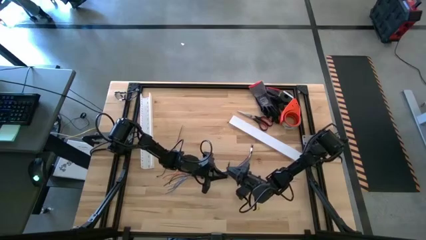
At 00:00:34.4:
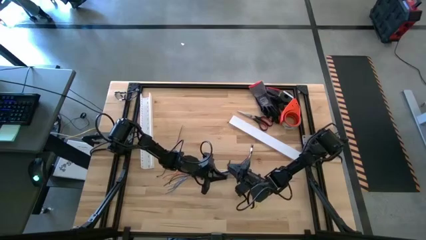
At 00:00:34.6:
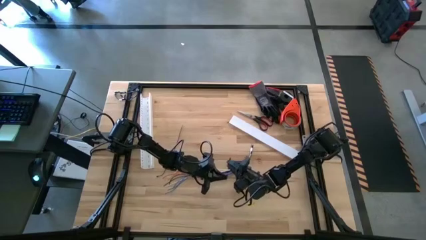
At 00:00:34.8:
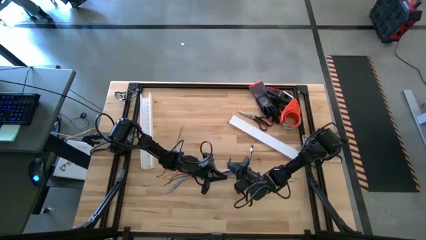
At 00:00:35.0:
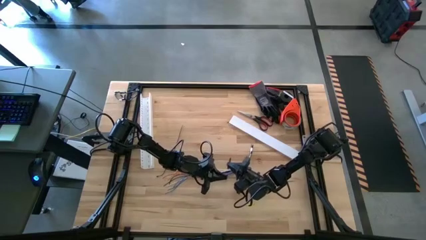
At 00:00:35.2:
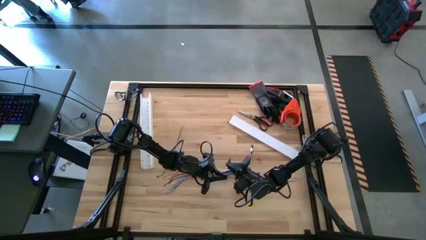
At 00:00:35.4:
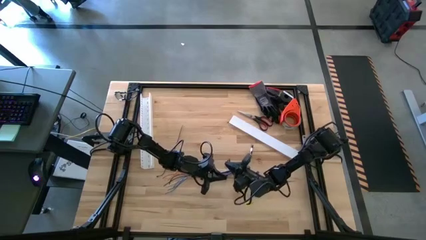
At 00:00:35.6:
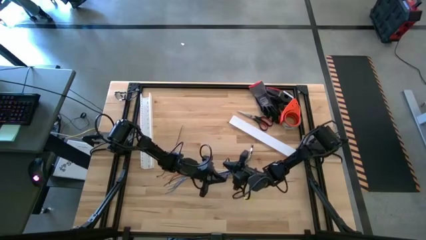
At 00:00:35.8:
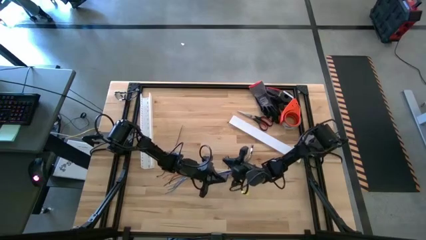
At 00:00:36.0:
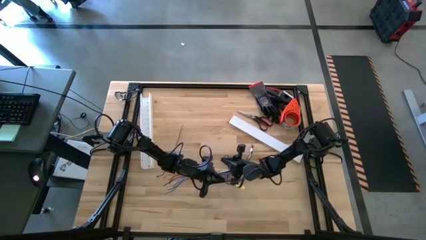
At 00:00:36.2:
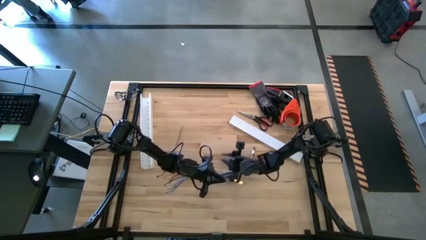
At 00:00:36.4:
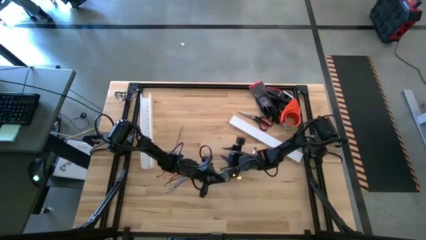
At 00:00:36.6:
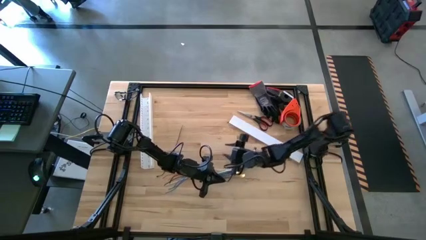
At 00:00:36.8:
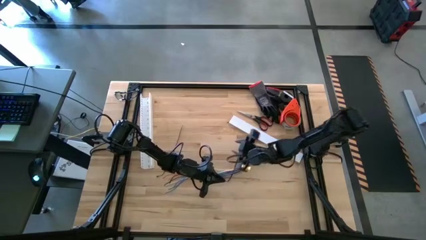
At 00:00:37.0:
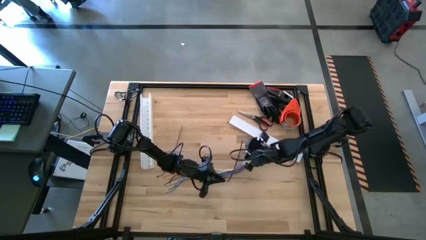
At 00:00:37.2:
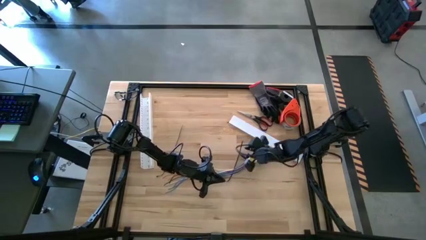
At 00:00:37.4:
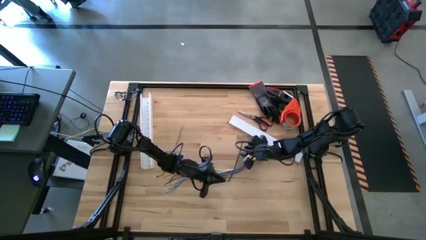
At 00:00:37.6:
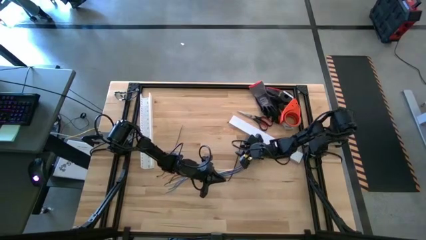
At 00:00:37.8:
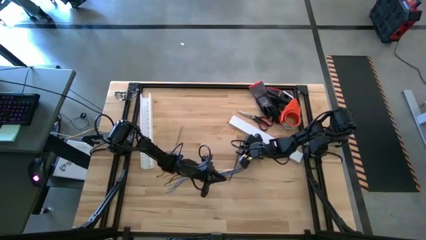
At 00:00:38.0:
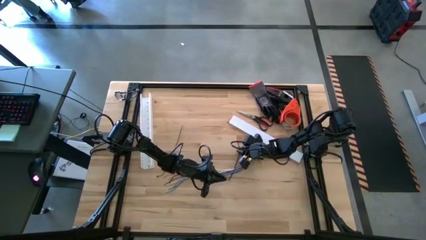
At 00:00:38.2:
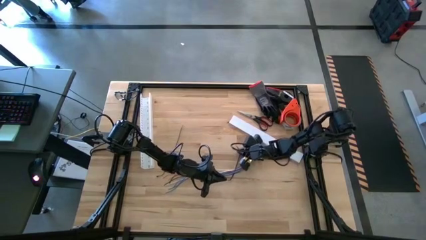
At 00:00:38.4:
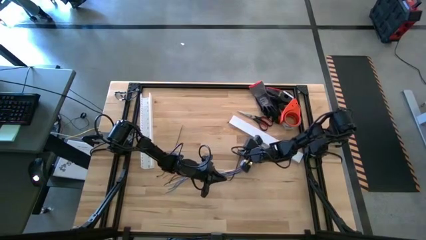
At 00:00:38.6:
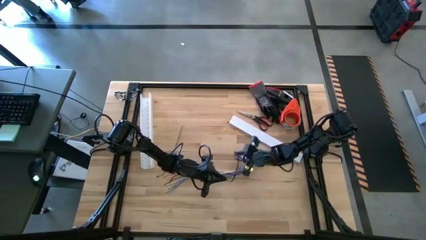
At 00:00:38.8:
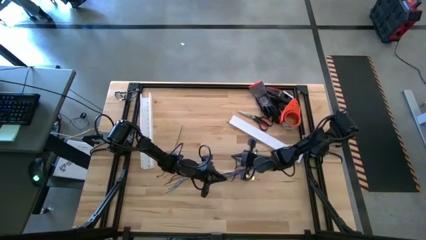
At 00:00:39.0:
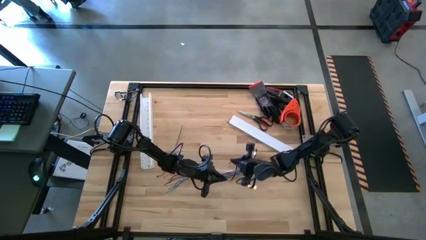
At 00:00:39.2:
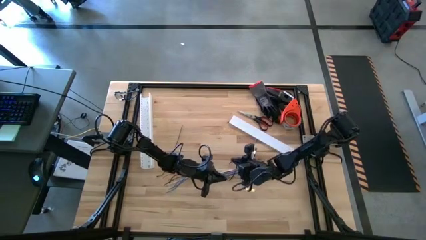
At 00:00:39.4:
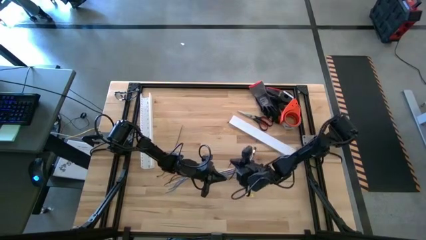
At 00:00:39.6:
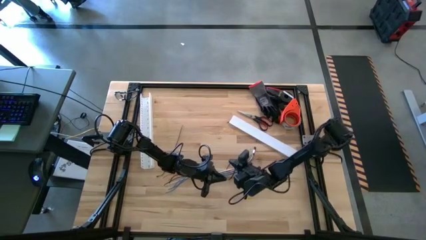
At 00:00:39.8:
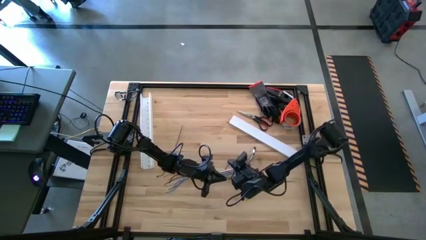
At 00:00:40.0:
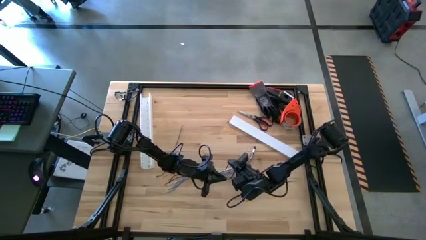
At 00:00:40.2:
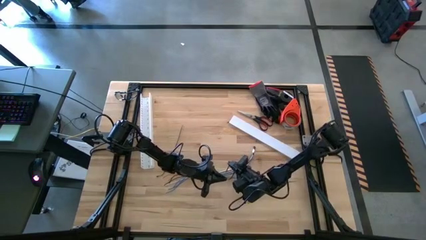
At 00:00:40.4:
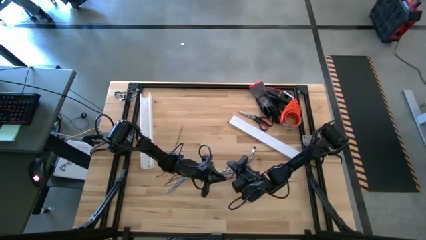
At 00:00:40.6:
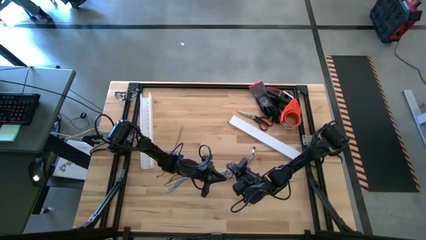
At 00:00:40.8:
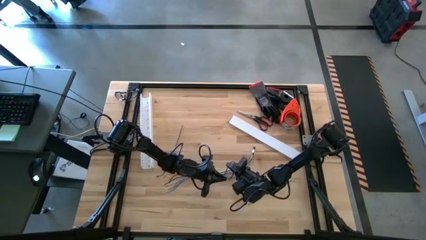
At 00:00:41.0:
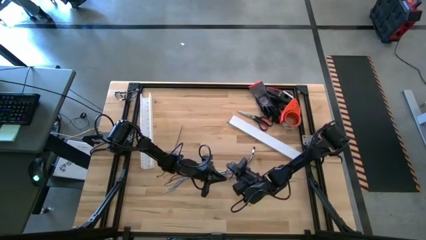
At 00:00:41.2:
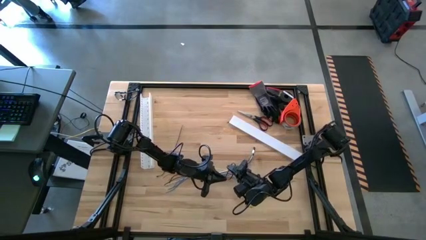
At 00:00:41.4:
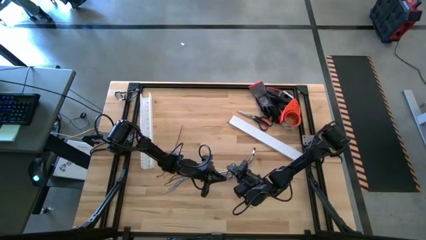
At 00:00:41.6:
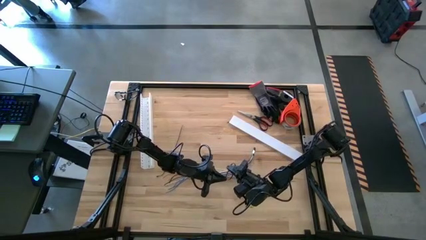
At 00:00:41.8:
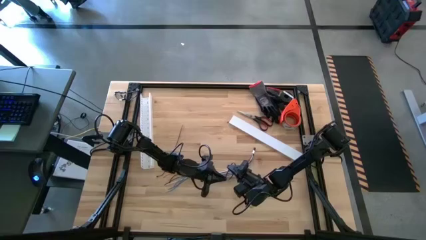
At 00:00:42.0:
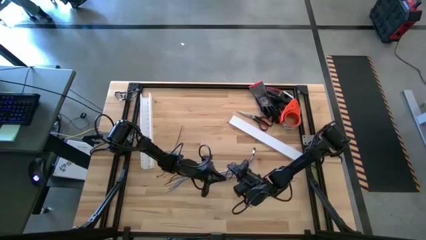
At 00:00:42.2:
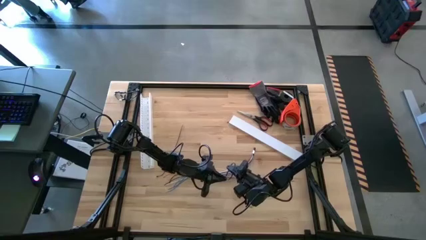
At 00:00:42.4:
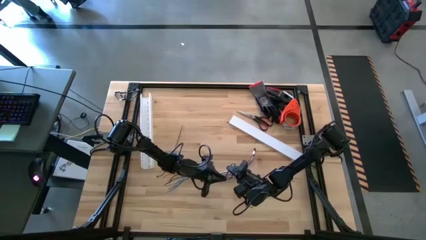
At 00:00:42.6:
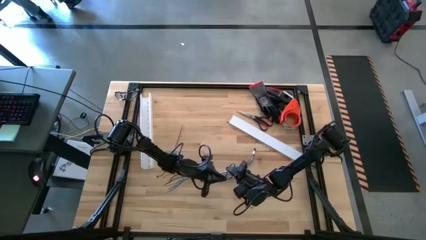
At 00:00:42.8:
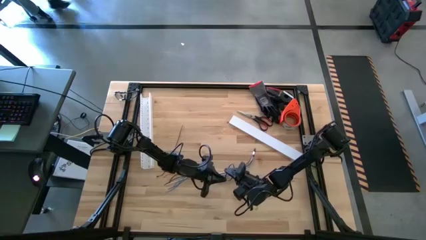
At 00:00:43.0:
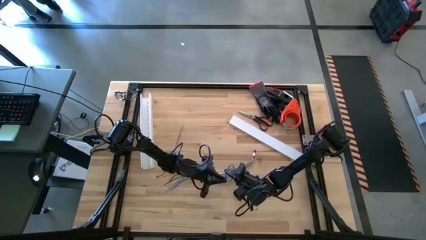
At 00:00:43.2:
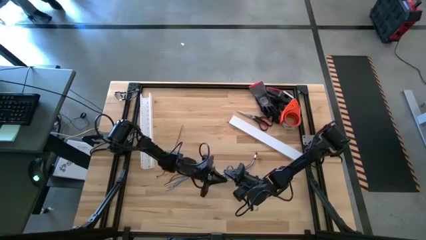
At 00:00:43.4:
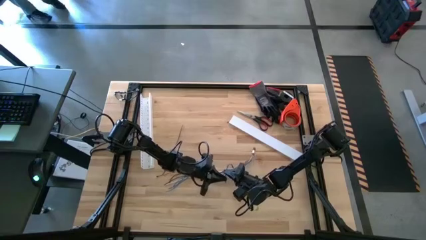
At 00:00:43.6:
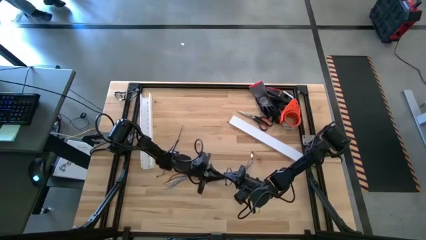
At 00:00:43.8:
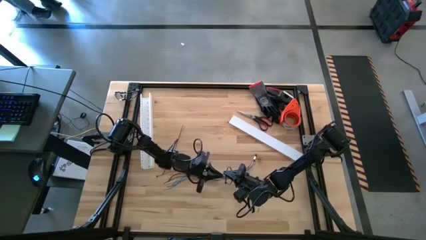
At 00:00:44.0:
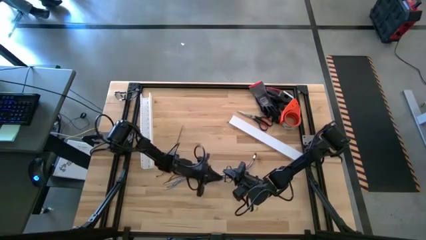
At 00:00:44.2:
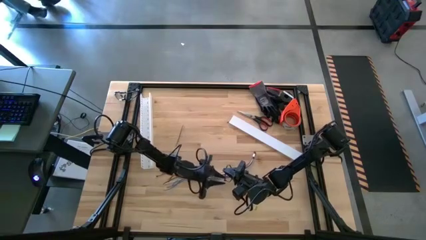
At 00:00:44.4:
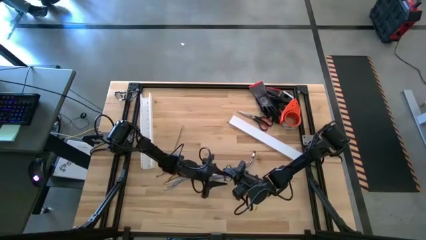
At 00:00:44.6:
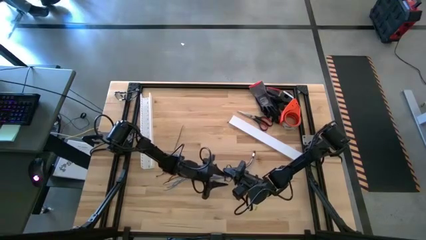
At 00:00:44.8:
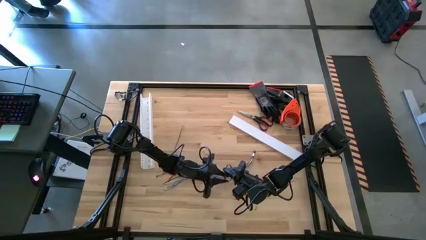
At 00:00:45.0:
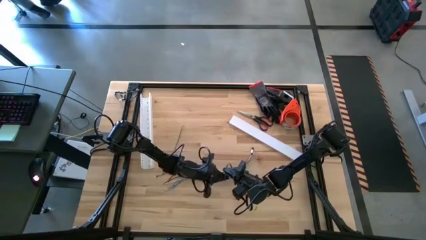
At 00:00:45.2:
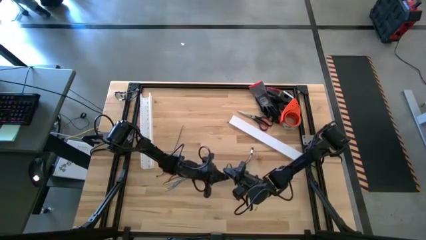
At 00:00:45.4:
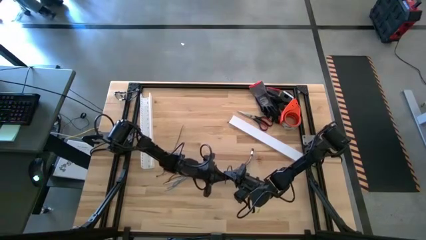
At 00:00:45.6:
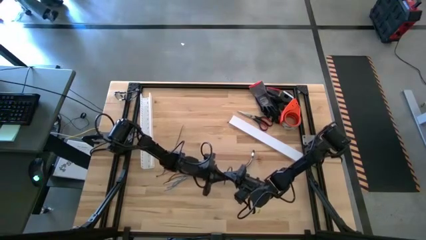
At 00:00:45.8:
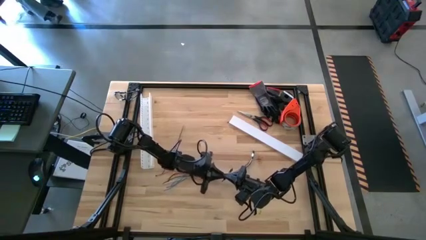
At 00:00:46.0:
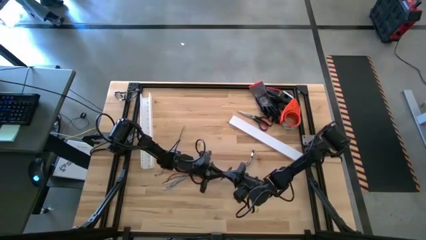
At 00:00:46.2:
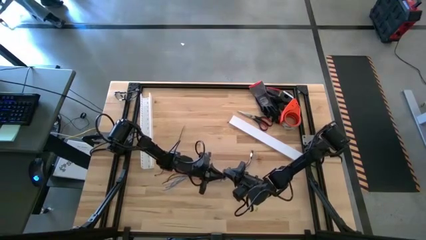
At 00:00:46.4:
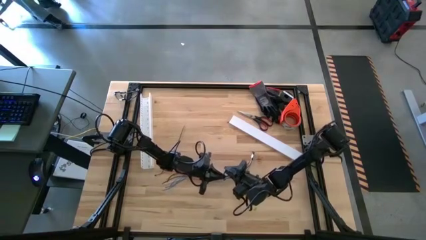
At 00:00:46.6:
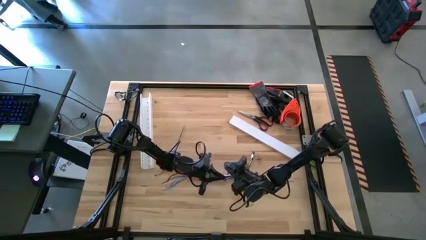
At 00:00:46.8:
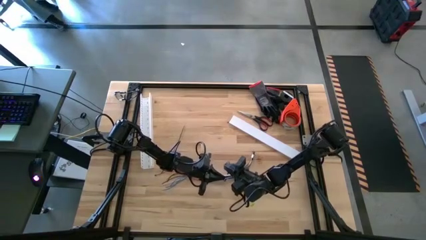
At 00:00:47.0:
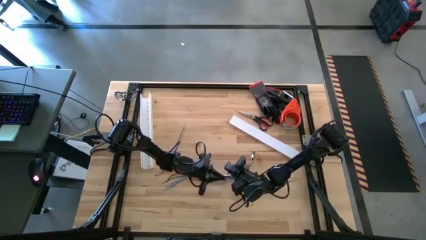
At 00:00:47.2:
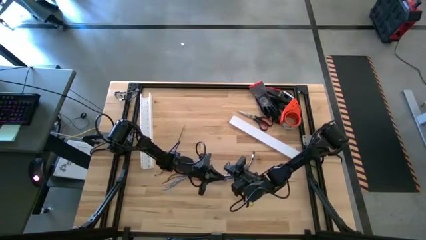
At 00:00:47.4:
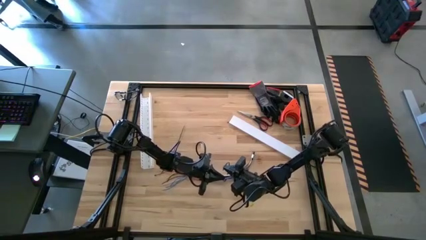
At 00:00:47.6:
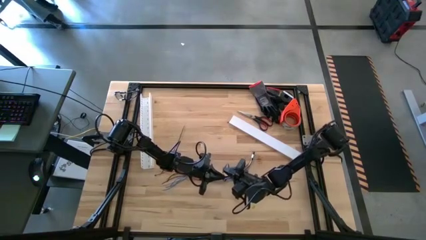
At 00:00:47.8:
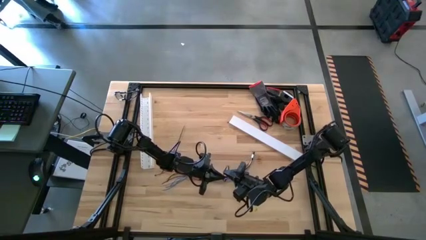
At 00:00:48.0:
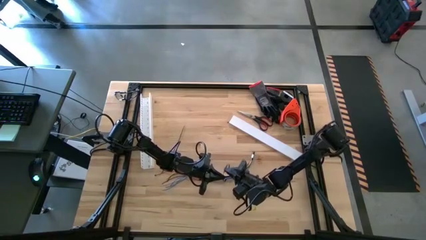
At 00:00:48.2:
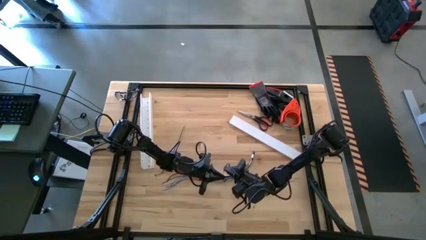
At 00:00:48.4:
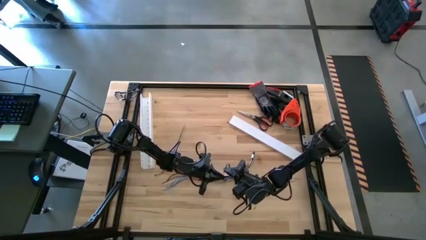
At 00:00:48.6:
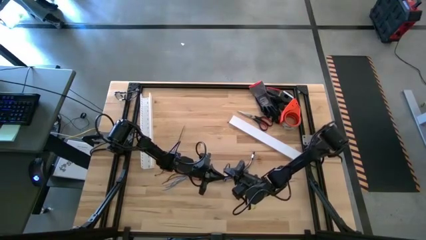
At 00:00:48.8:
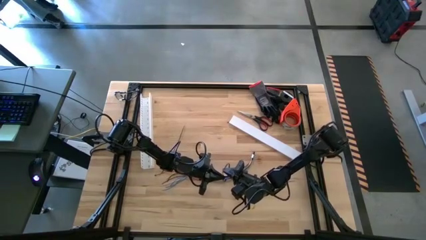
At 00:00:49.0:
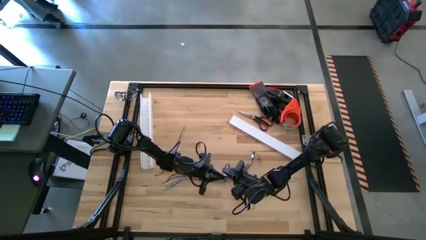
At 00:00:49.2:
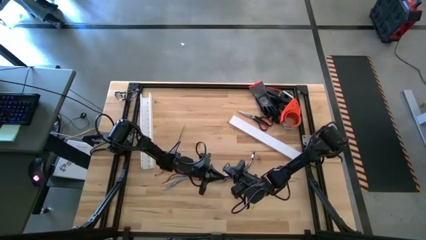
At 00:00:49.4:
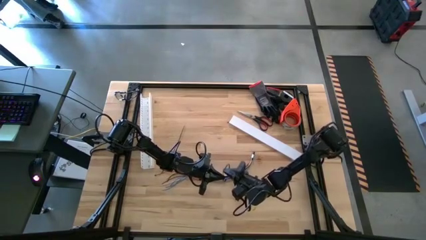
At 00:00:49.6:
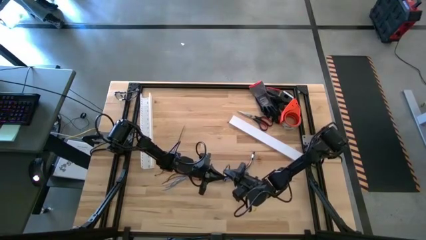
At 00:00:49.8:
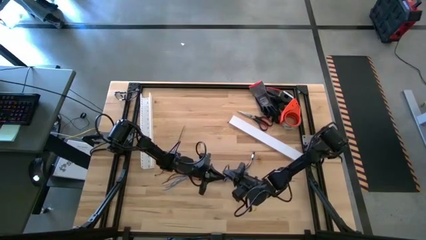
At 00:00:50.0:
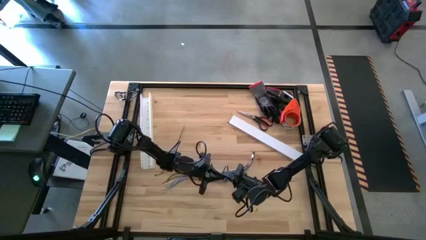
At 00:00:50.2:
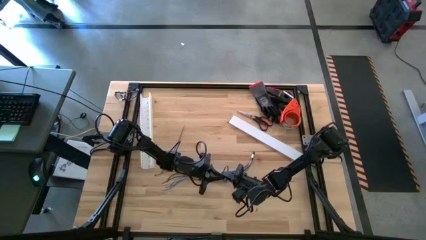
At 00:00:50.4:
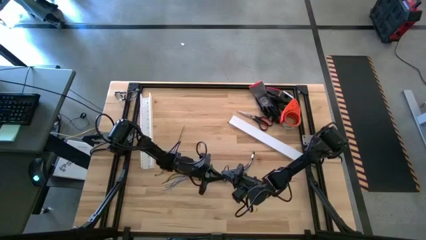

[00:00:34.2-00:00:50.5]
Task: Ziptie cables
Wrap the zip tie on the cable
